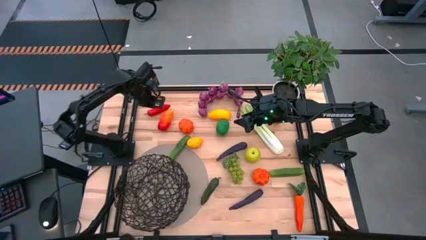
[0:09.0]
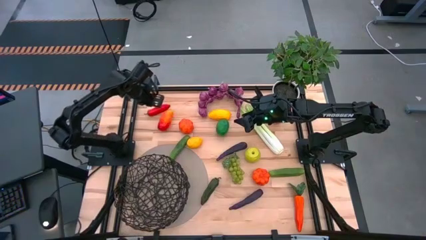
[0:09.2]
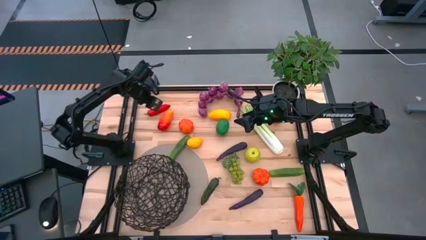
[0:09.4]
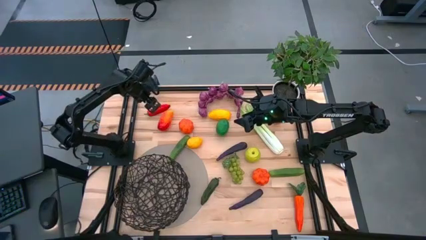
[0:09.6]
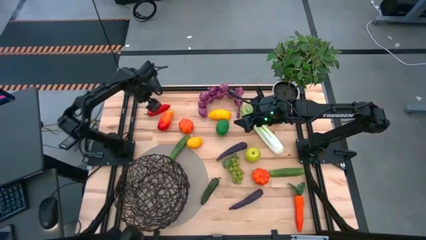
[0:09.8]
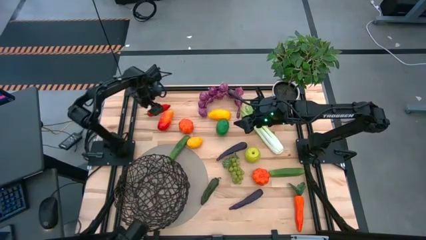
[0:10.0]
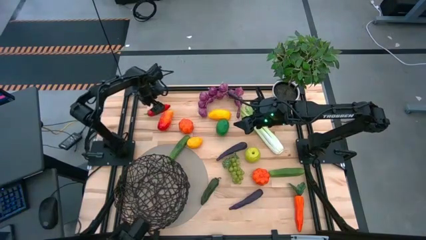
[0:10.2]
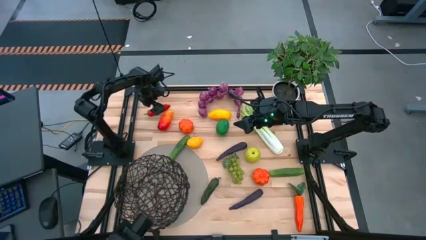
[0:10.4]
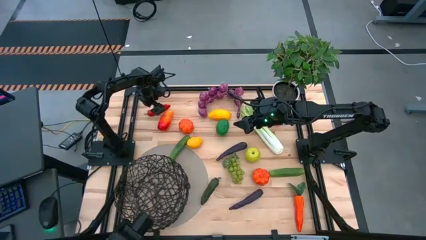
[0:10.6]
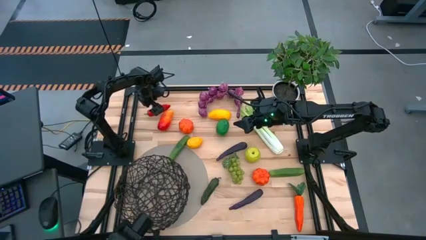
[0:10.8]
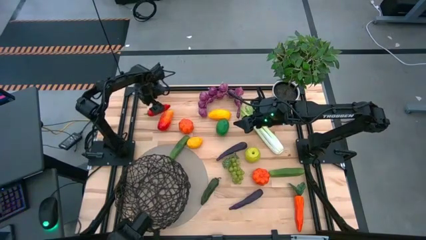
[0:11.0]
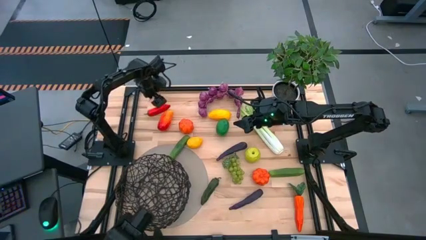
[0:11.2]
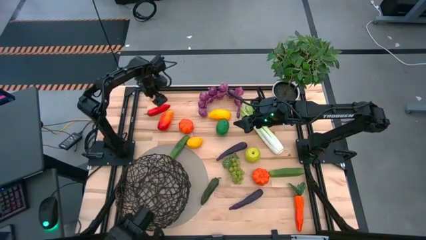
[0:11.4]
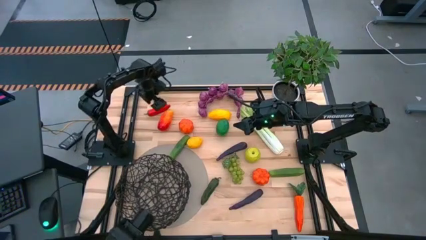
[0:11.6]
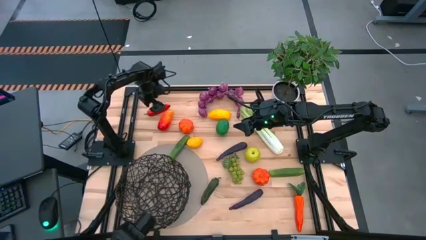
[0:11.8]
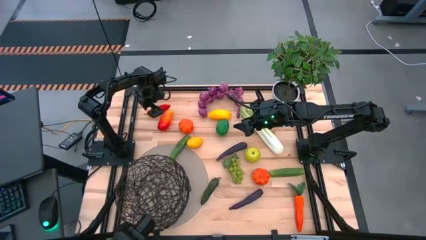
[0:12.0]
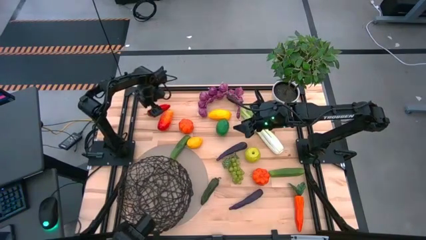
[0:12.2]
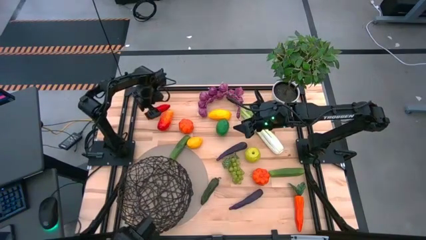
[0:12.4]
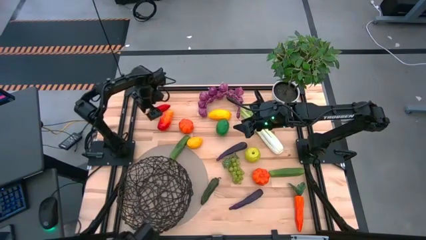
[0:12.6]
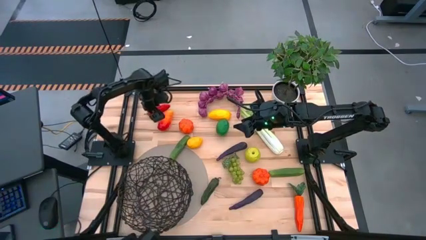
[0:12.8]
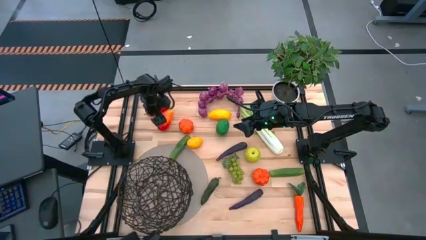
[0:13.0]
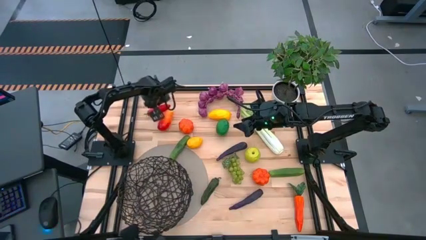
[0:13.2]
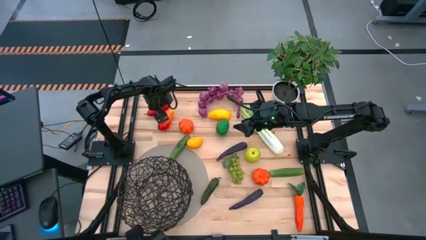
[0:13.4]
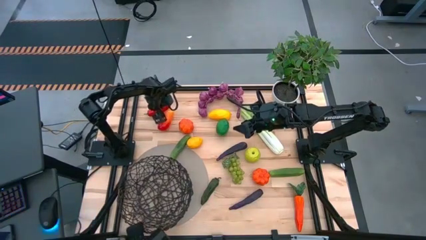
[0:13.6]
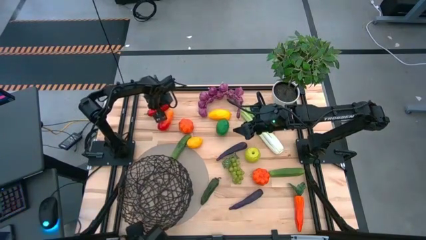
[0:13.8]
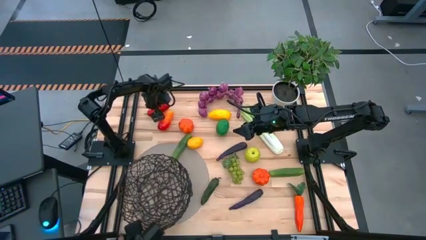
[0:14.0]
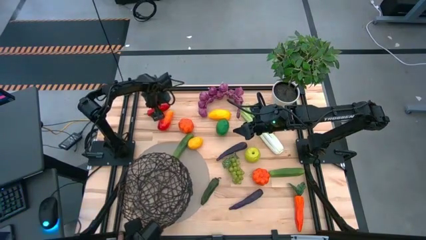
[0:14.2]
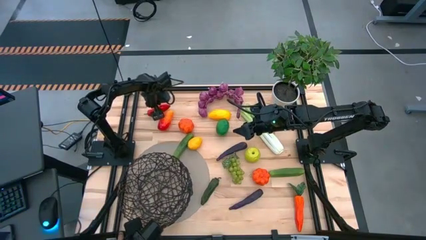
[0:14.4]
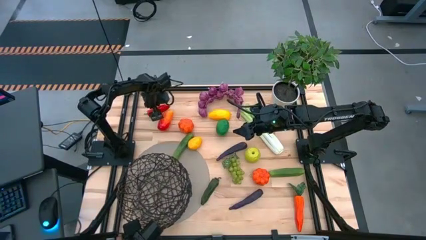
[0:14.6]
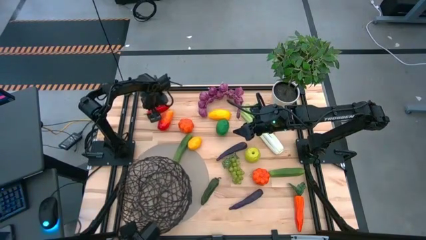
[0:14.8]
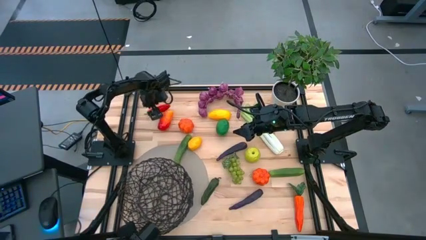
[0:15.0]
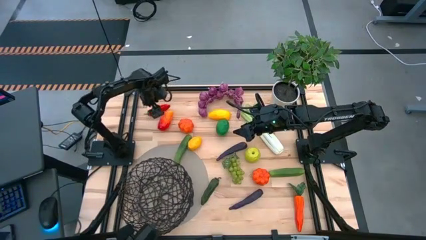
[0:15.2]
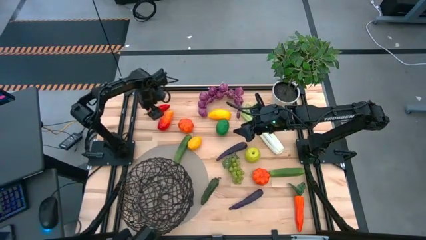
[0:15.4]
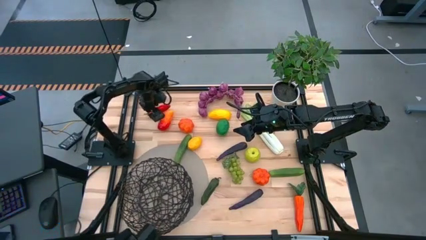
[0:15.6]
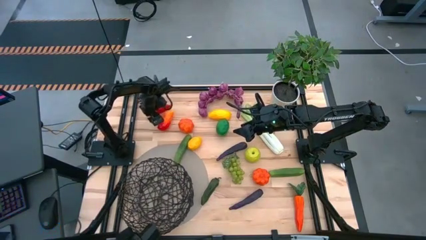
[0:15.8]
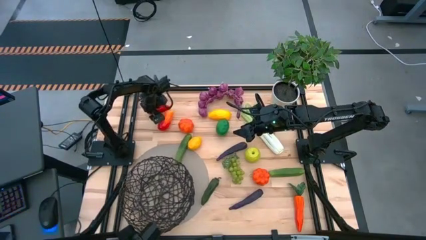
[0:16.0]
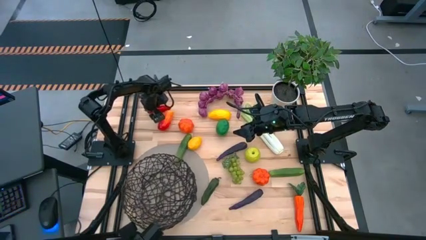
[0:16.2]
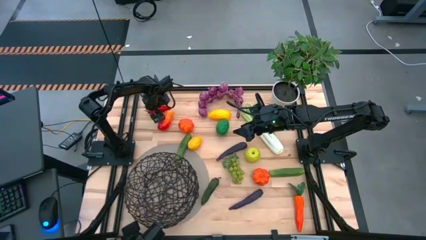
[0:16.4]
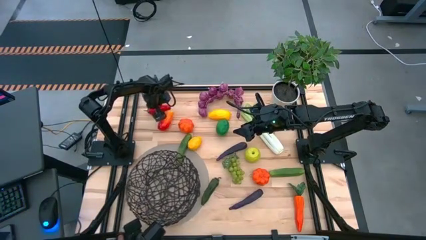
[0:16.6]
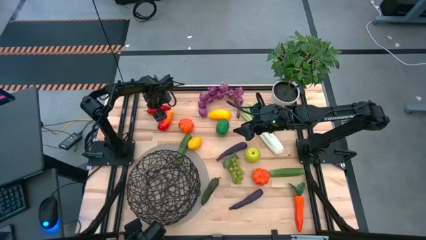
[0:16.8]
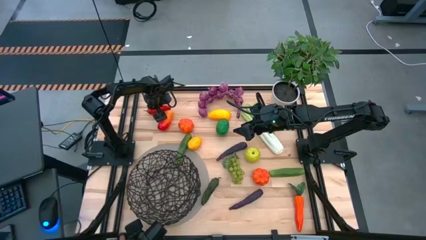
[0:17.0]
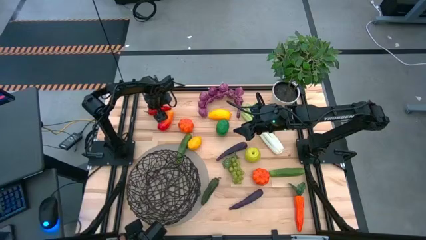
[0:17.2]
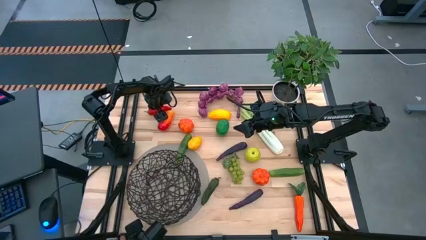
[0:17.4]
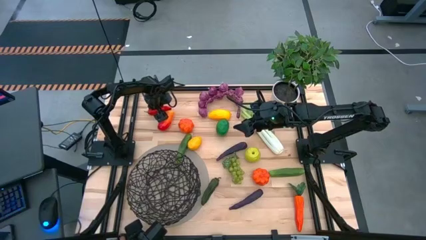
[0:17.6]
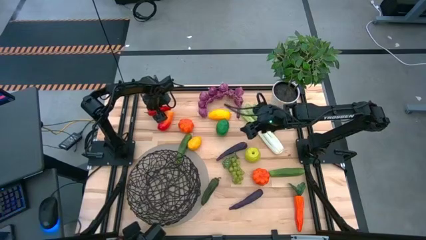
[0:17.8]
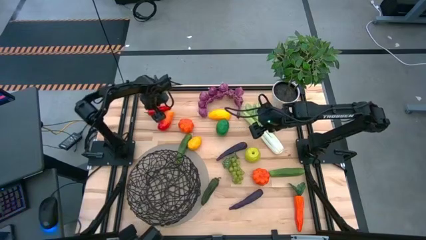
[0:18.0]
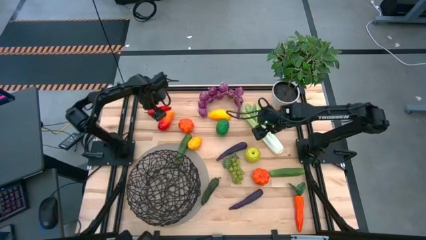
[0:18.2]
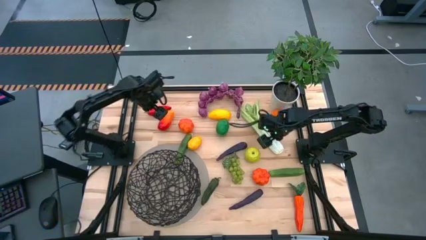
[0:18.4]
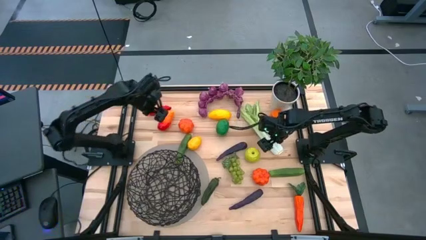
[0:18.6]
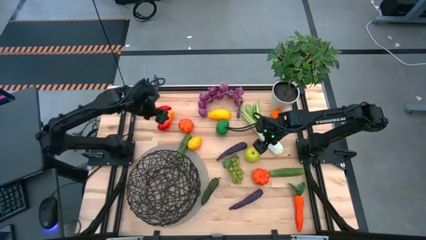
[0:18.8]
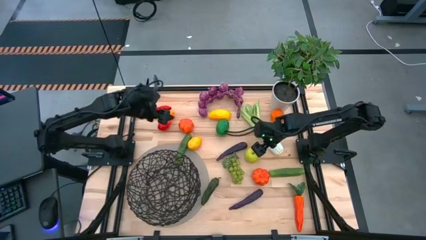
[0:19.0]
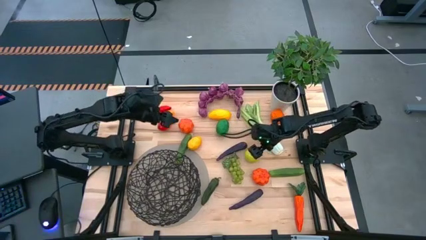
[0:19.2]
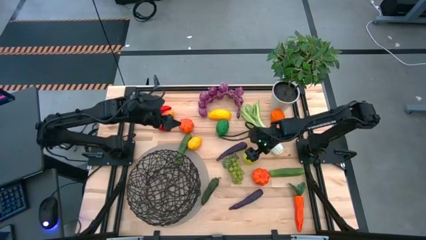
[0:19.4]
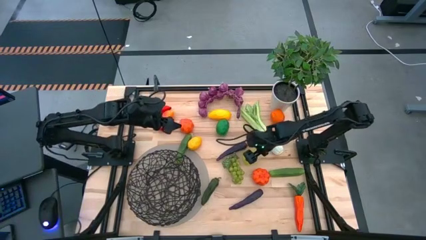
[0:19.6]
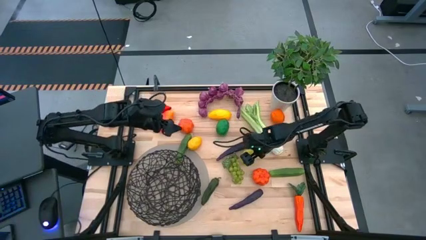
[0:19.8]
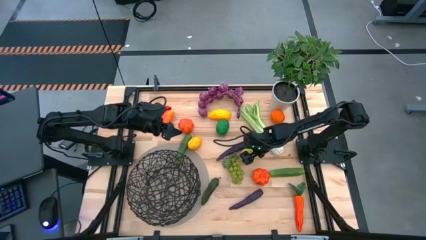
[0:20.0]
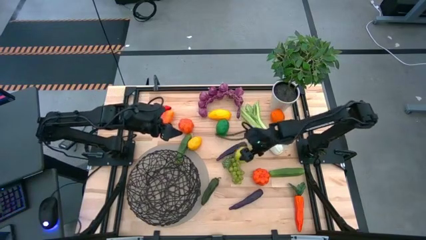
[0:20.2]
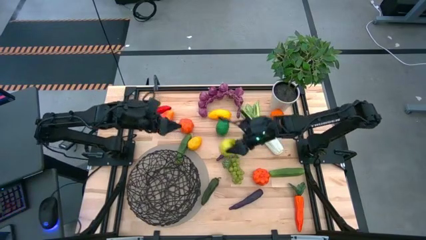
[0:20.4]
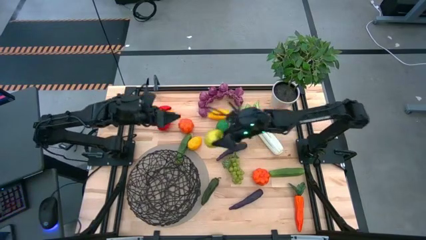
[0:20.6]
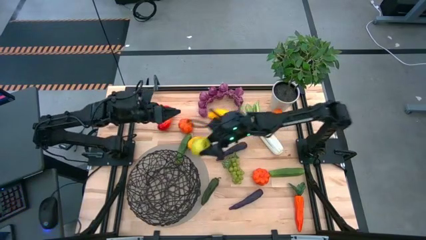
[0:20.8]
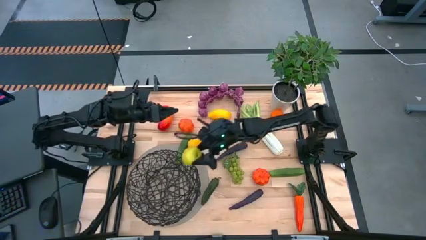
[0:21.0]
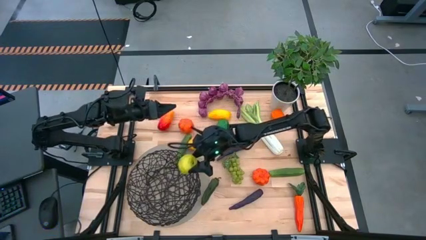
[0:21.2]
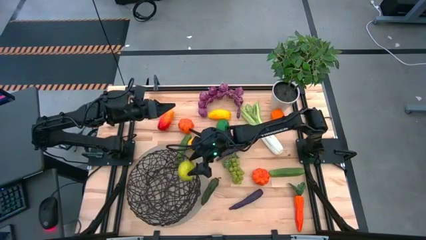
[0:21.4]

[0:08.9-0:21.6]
Task: Build produce basket
Put the green apple into the black basket

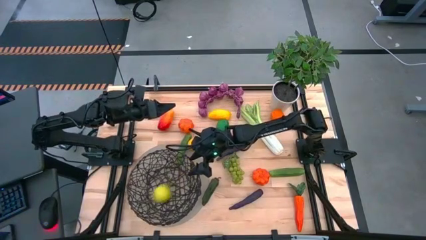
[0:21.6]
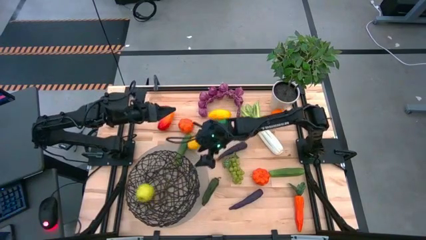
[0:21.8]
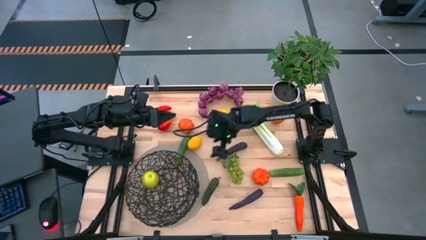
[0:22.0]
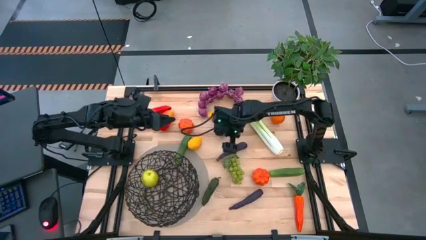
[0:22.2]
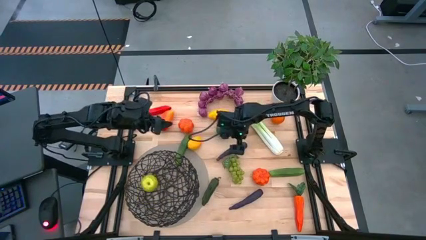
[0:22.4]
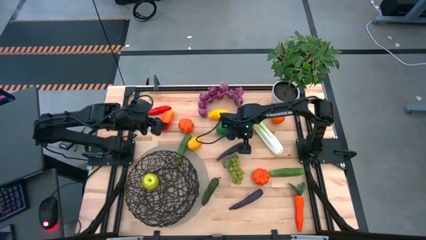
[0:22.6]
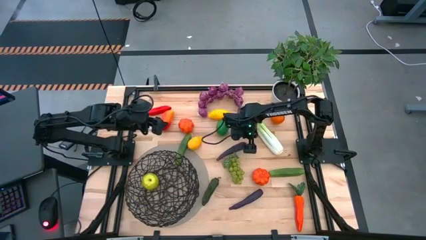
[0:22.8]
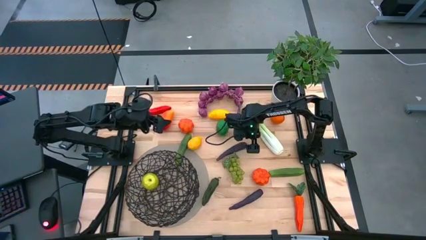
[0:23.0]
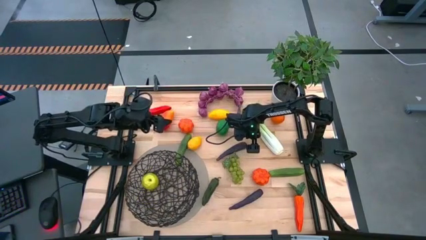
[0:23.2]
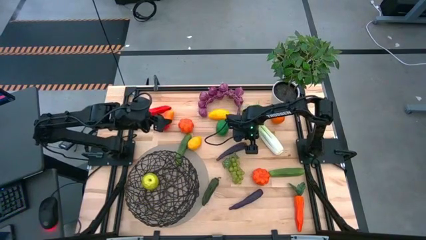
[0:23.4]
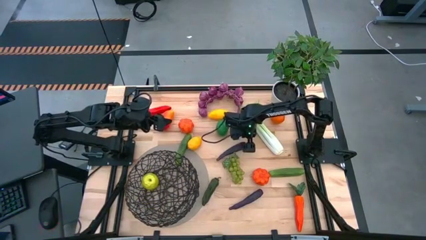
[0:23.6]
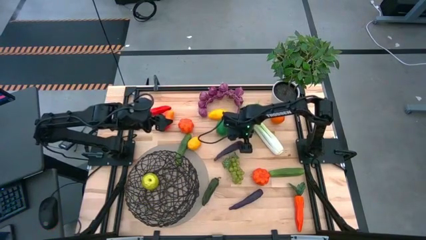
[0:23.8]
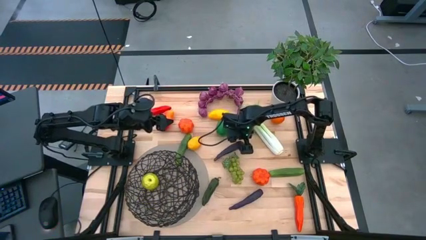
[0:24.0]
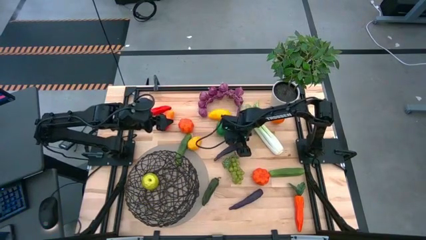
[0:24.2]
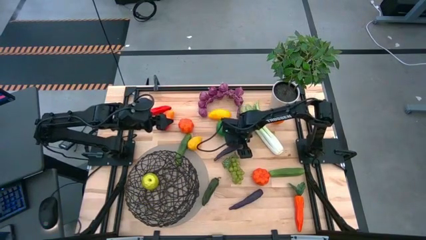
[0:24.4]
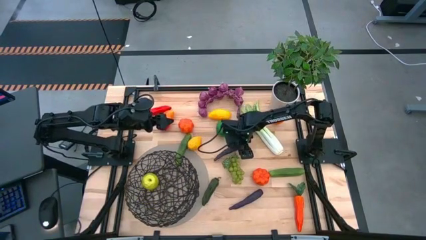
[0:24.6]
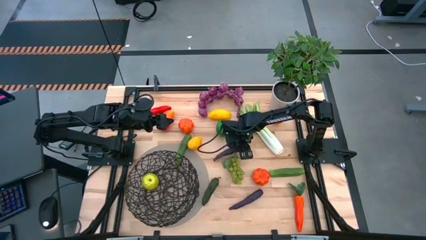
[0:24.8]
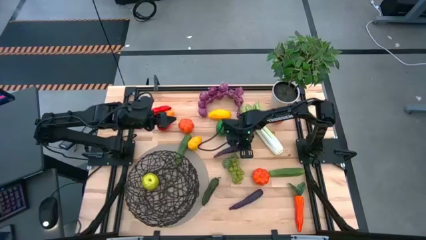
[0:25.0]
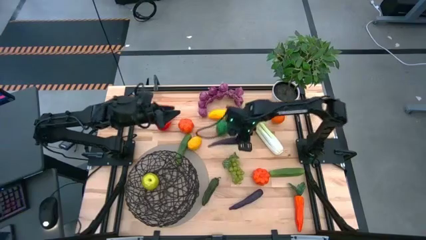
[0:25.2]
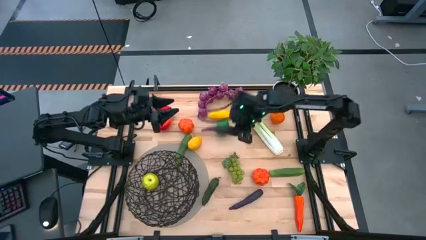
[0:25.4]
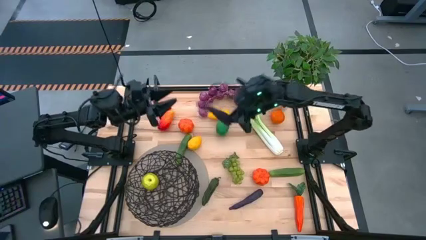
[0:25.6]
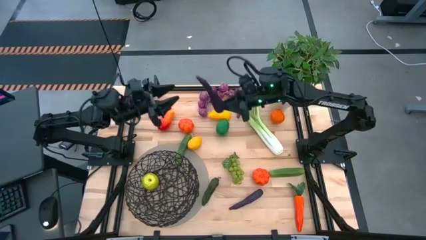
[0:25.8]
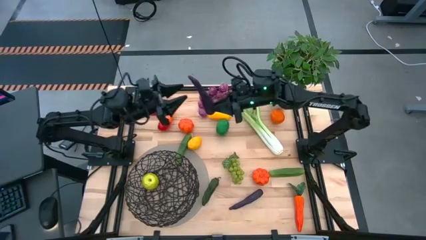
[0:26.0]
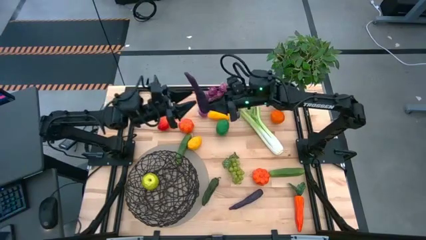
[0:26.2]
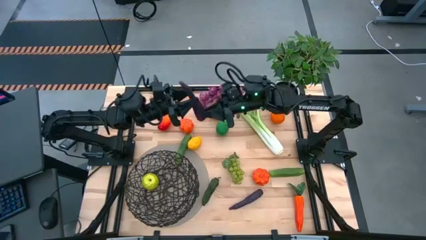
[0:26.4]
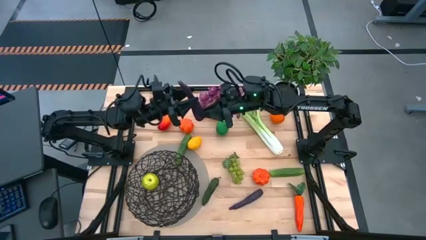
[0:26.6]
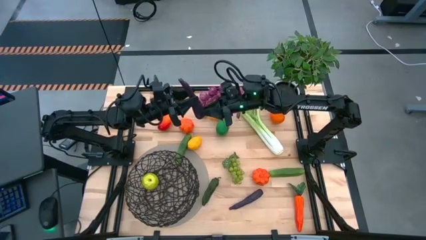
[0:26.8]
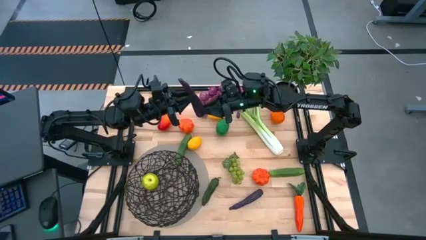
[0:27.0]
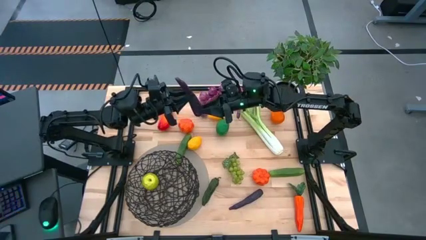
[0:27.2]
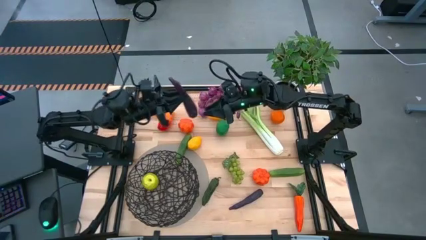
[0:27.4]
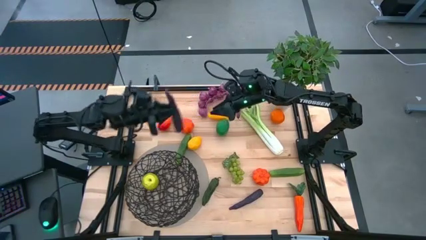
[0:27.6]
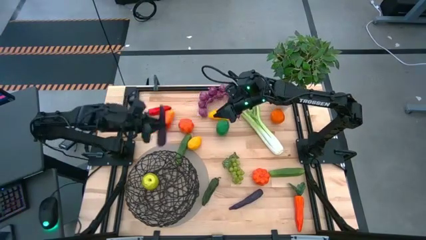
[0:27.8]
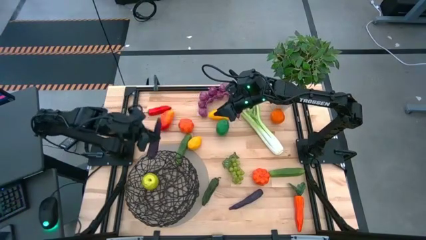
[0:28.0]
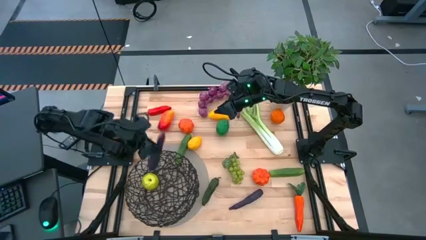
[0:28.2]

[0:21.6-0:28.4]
Put the top violet eggplant into the black basket
